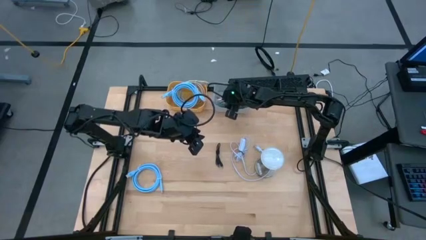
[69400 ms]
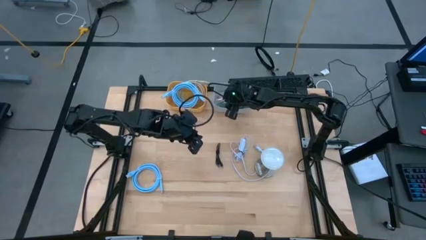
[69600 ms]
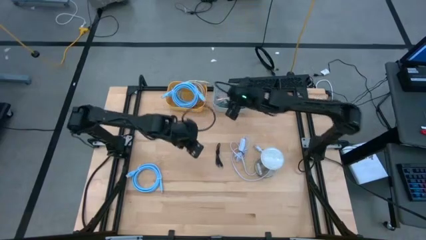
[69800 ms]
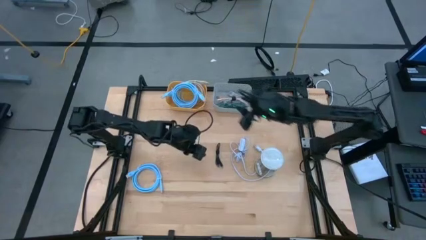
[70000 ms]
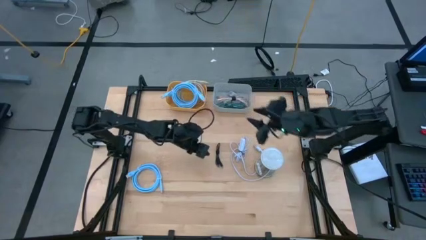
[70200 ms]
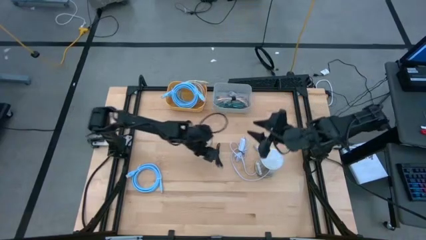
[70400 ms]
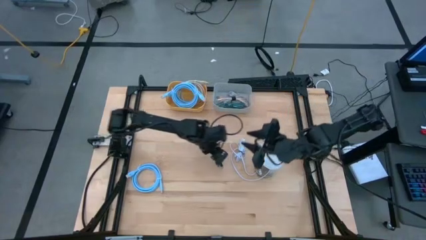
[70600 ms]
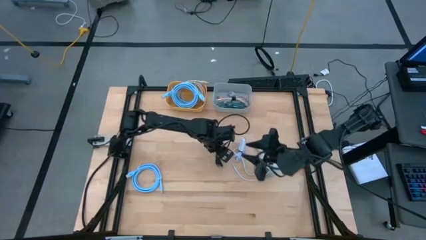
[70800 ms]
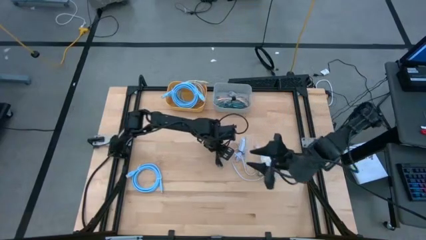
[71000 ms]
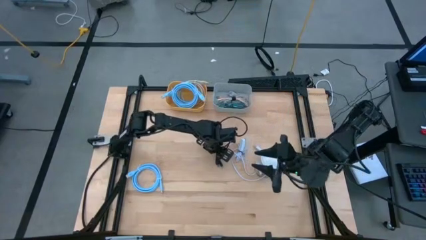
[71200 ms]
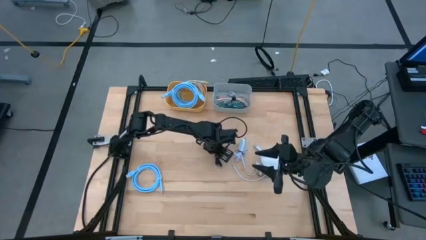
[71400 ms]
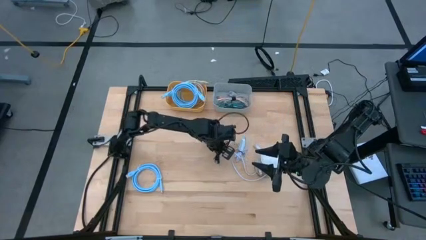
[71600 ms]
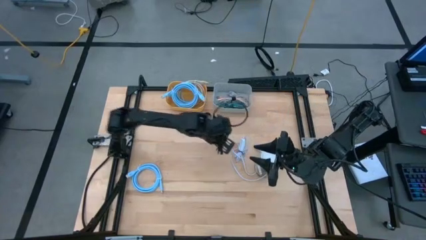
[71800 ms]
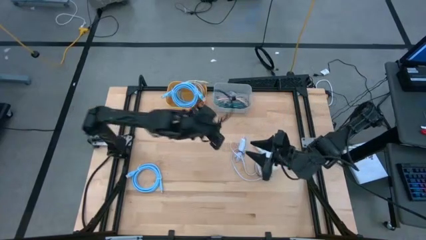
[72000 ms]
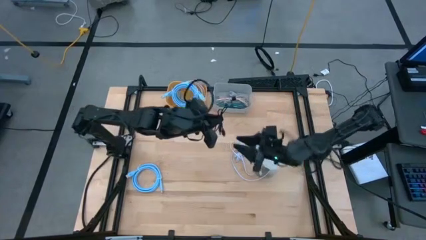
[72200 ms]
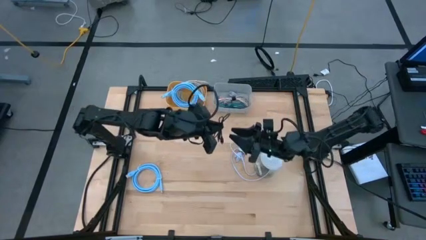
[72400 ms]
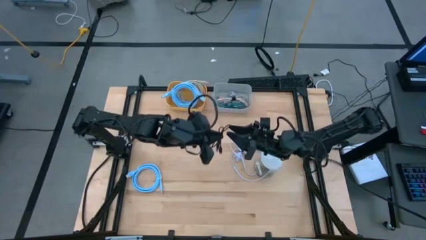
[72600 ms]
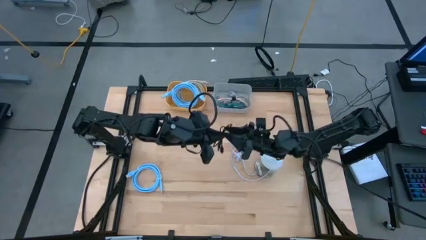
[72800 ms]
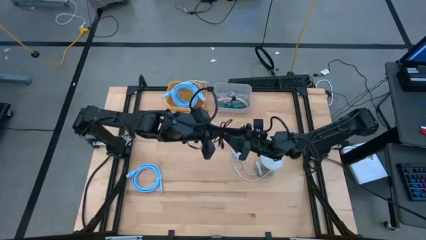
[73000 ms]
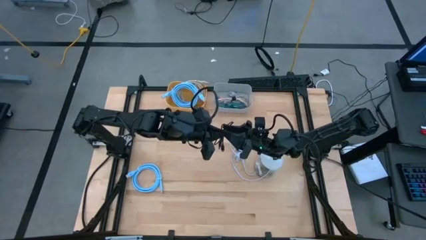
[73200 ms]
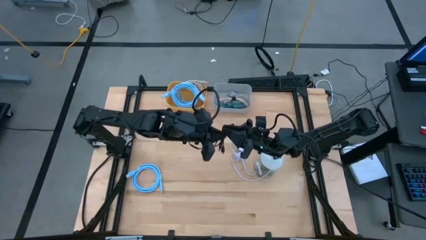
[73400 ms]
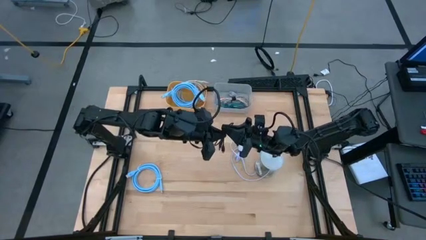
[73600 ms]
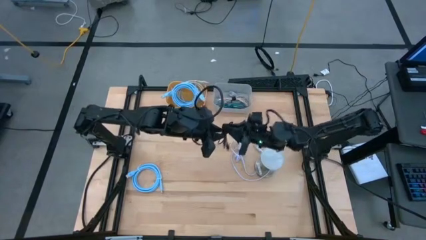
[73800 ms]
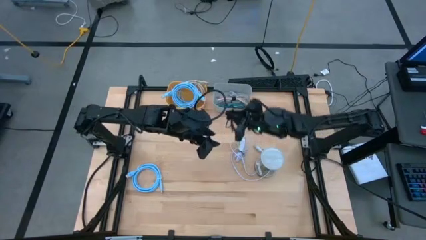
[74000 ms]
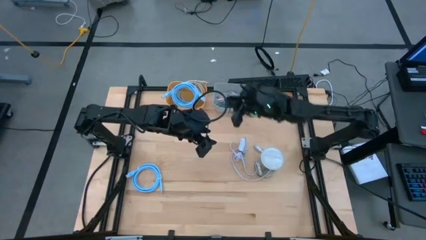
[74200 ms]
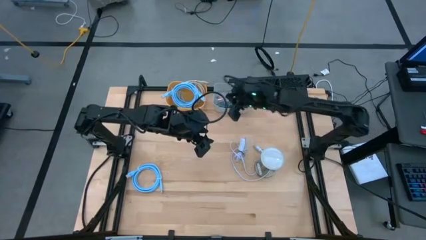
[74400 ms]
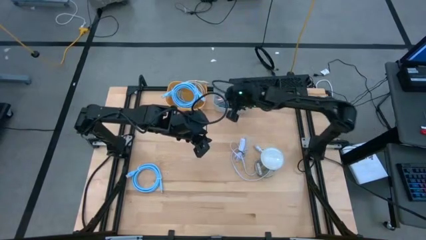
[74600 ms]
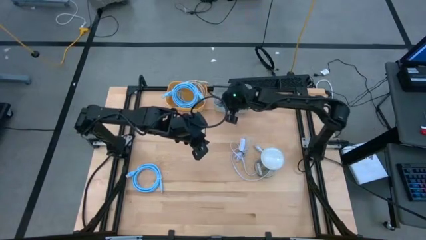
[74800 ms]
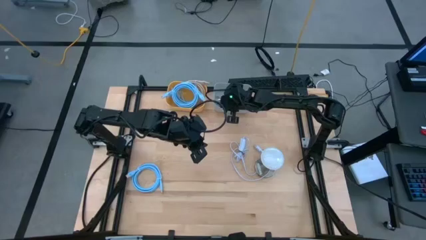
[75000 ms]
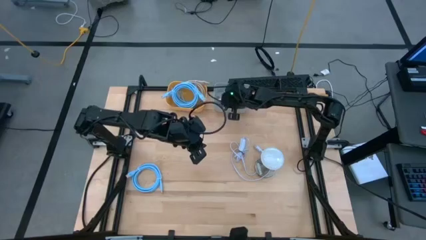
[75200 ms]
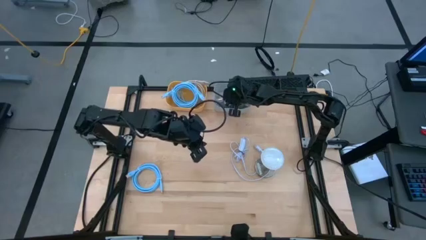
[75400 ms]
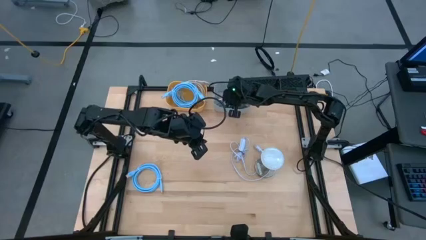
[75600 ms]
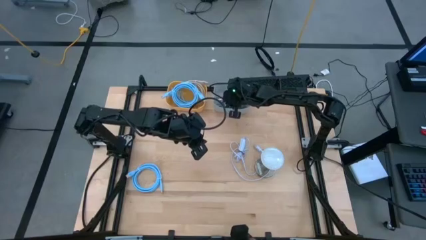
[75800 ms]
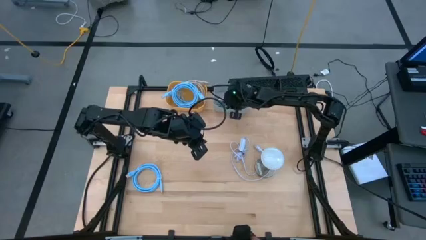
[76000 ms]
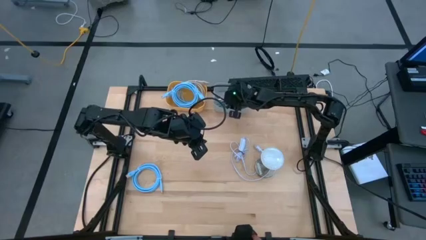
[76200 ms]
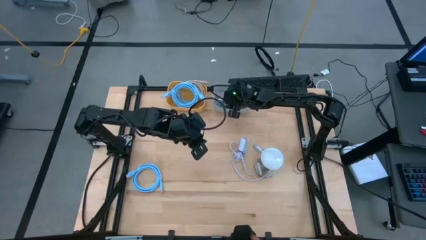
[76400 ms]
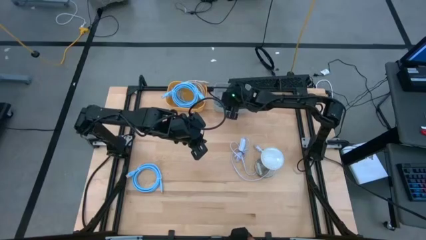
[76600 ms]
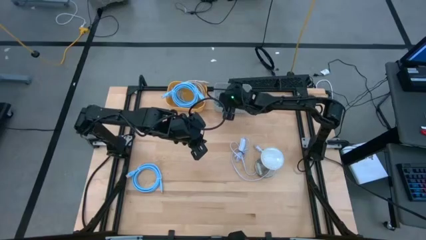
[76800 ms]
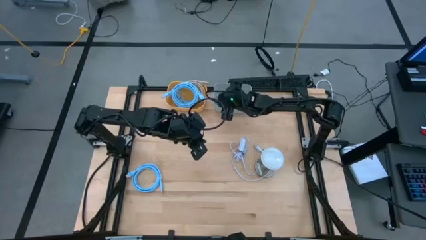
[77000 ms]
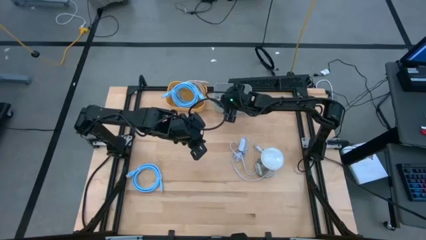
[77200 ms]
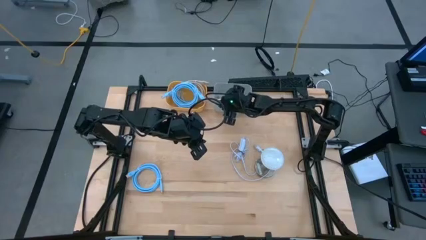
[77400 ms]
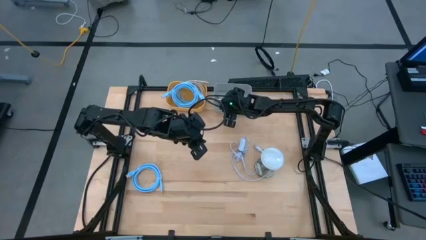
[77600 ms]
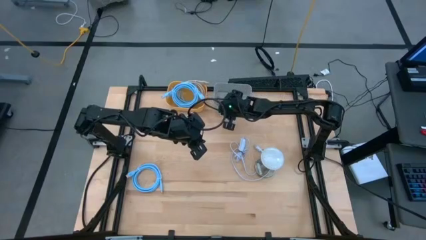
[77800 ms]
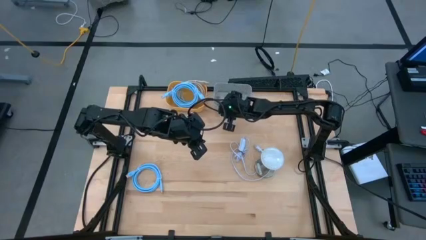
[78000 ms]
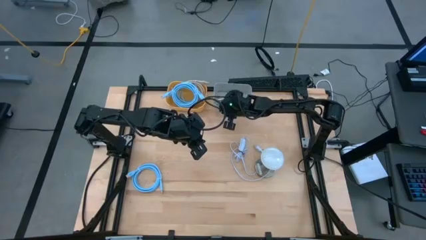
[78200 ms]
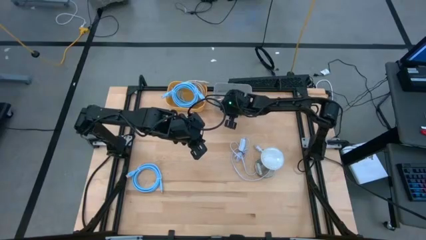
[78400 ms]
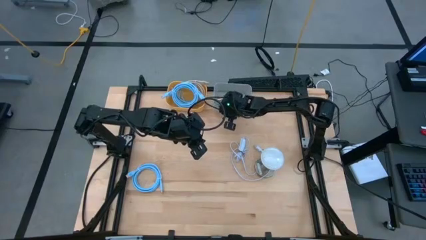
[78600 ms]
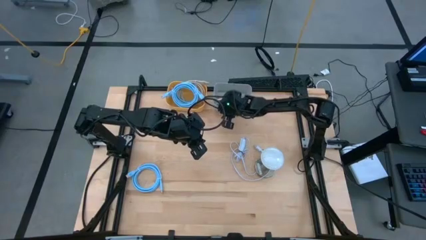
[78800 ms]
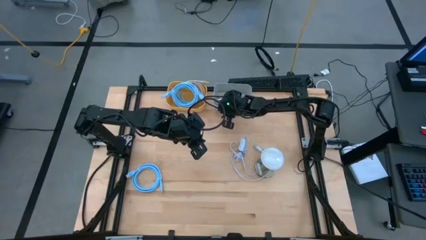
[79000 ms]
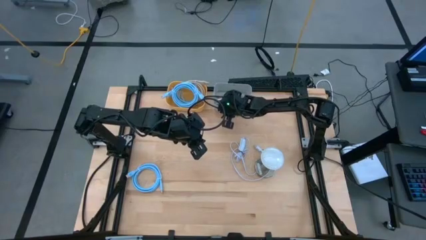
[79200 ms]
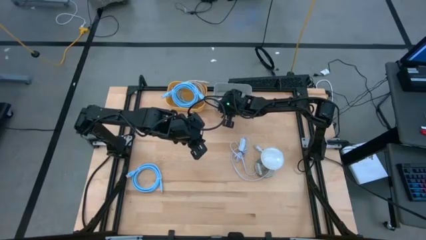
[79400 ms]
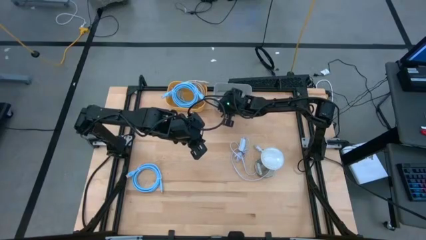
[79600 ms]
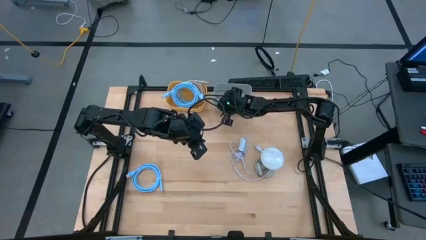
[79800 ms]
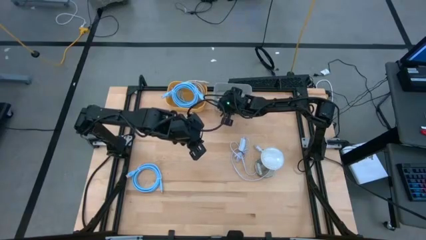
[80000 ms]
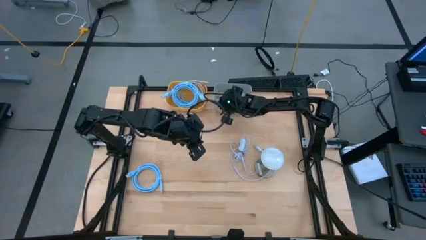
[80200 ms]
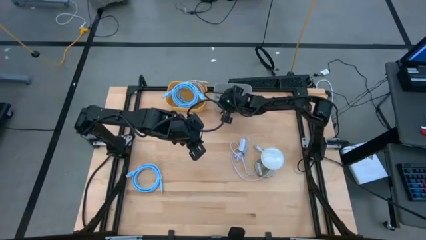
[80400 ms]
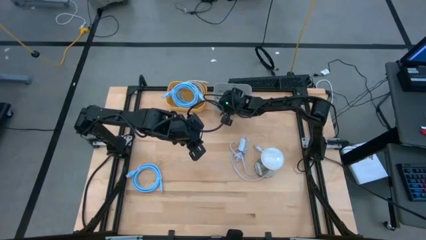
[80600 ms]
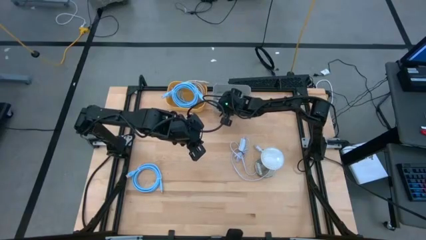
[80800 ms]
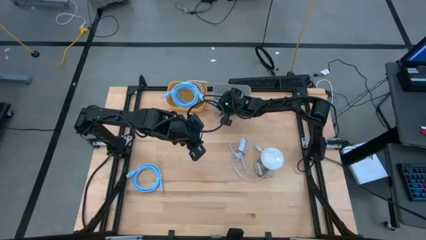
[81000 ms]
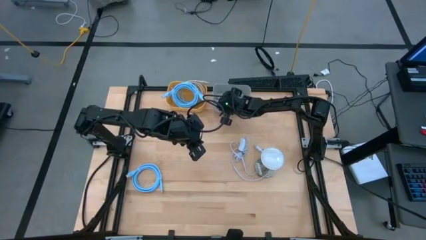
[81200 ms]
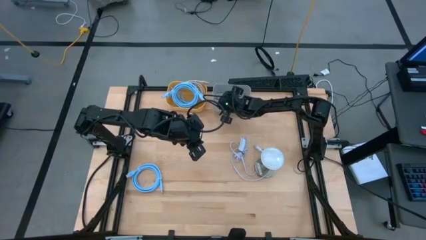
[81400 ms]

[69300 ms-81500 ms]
Task: Pick & Place USB Port
Put the black charger cable into the gray bin
